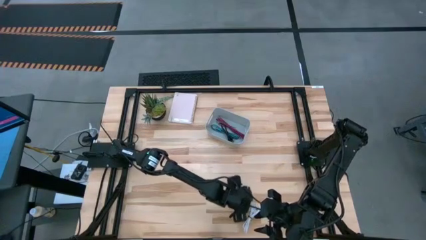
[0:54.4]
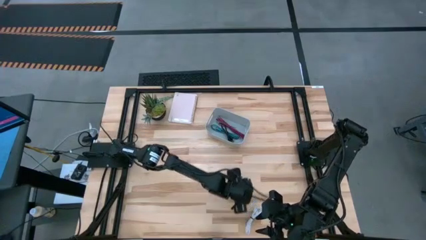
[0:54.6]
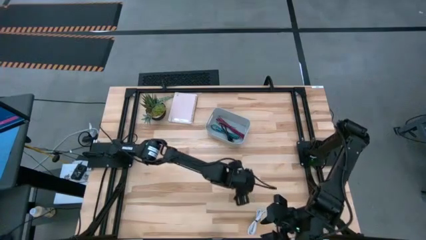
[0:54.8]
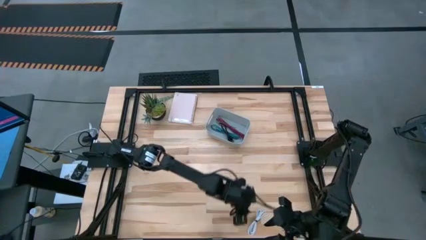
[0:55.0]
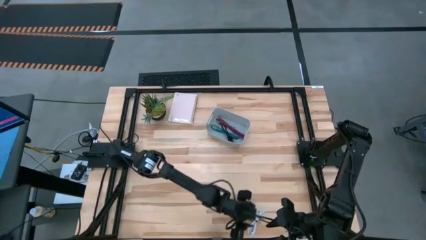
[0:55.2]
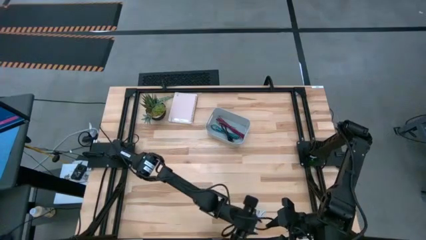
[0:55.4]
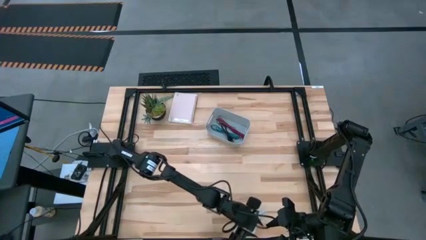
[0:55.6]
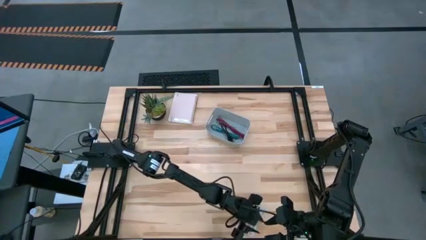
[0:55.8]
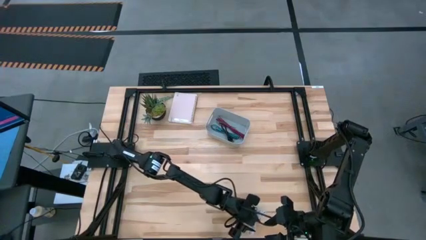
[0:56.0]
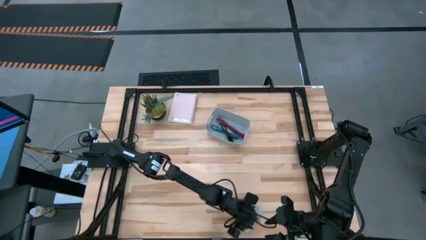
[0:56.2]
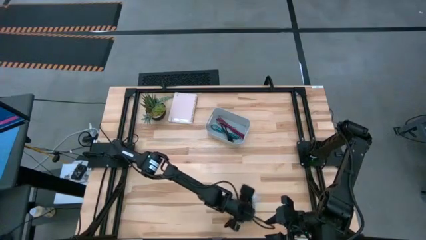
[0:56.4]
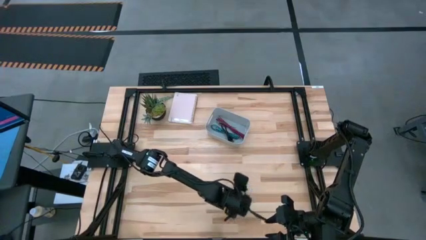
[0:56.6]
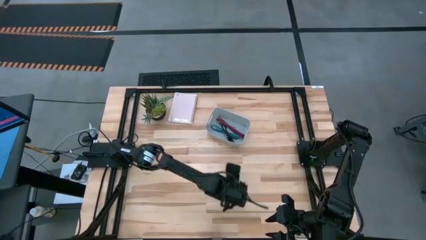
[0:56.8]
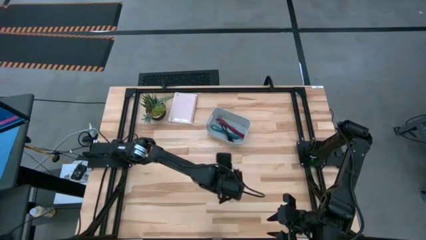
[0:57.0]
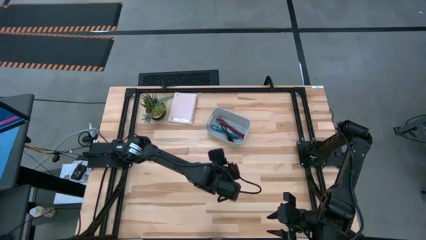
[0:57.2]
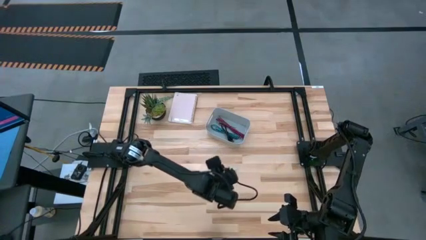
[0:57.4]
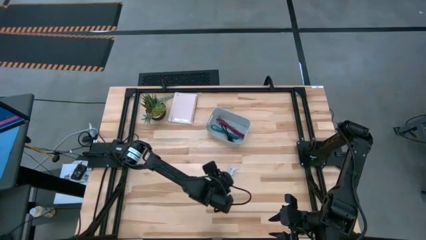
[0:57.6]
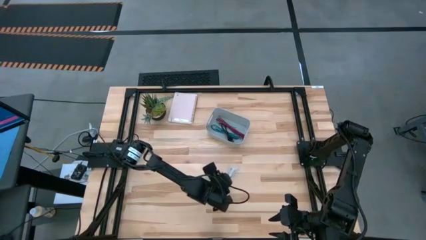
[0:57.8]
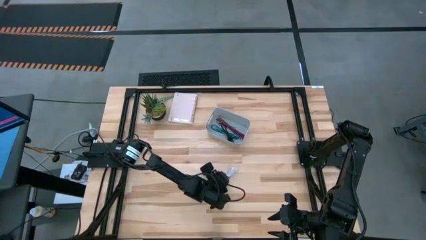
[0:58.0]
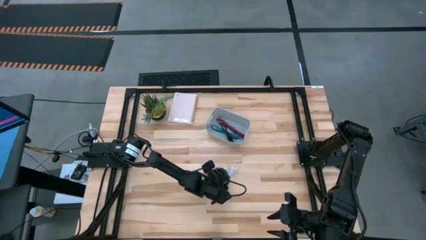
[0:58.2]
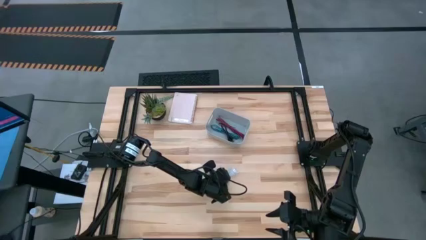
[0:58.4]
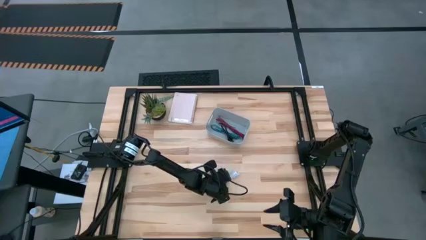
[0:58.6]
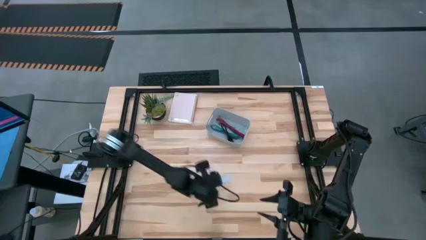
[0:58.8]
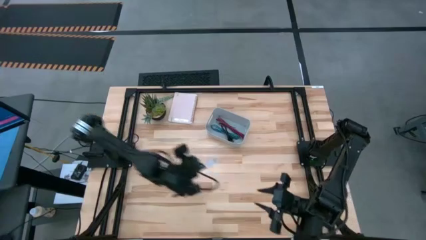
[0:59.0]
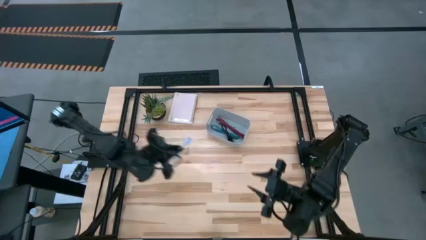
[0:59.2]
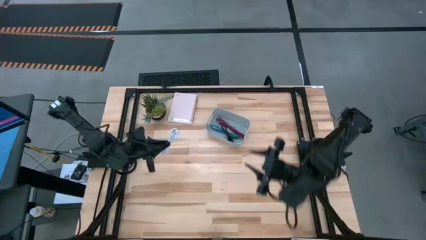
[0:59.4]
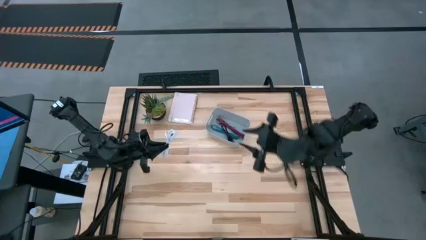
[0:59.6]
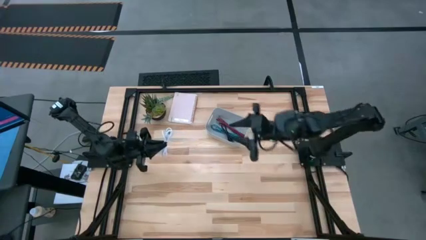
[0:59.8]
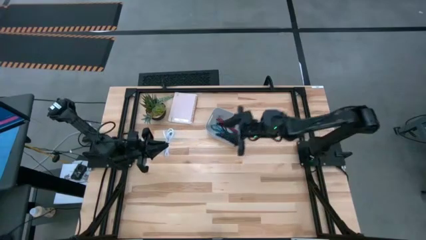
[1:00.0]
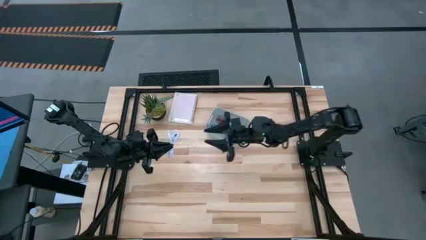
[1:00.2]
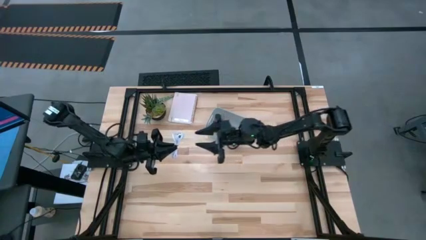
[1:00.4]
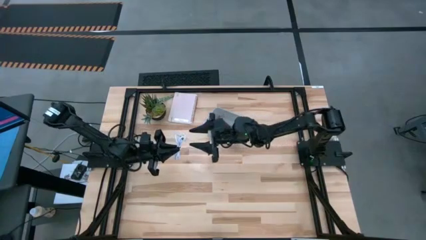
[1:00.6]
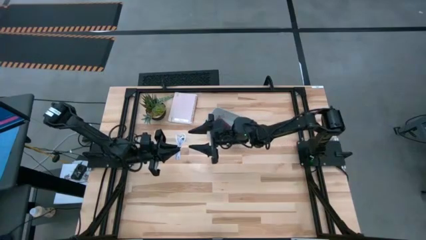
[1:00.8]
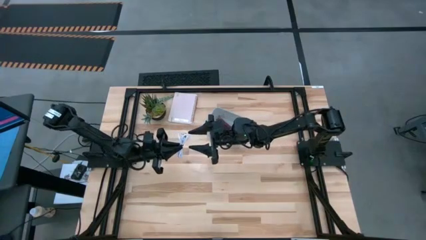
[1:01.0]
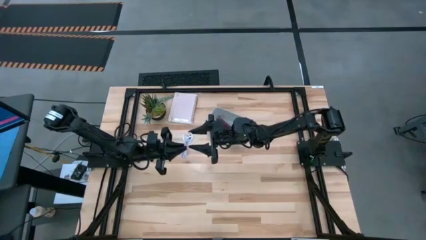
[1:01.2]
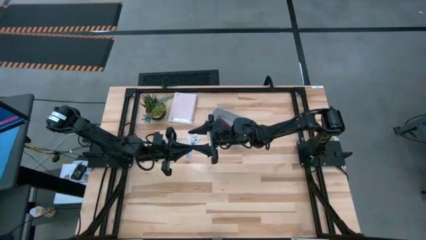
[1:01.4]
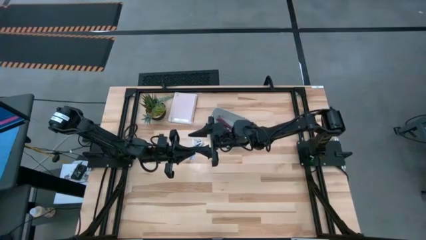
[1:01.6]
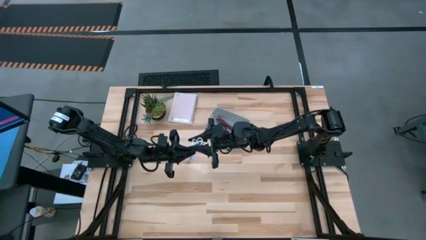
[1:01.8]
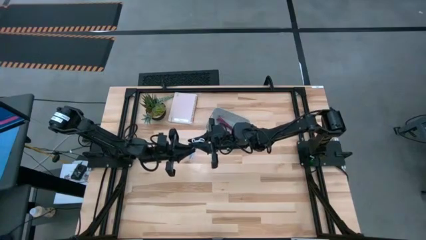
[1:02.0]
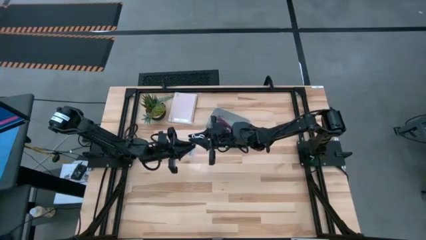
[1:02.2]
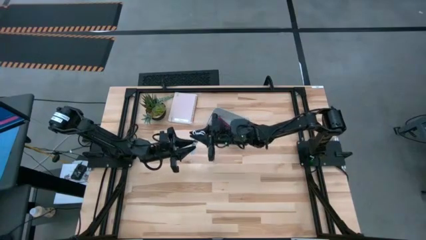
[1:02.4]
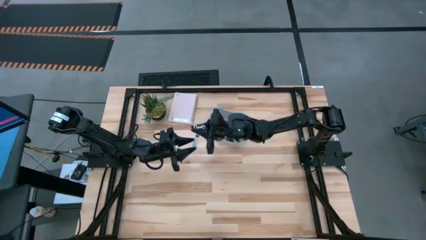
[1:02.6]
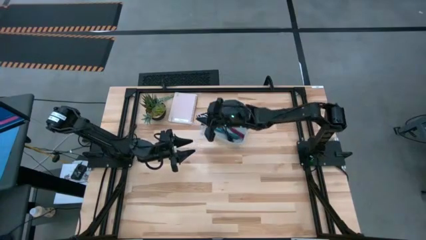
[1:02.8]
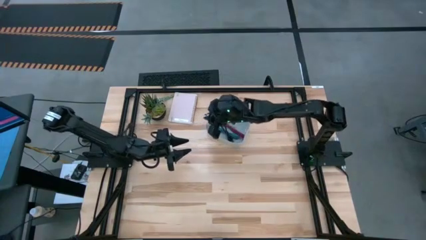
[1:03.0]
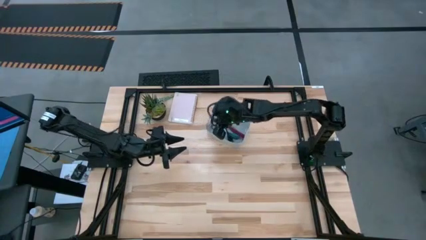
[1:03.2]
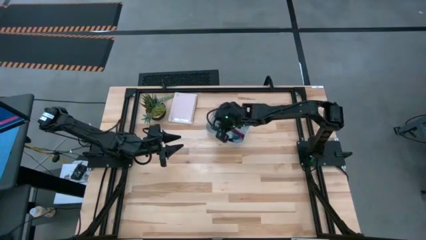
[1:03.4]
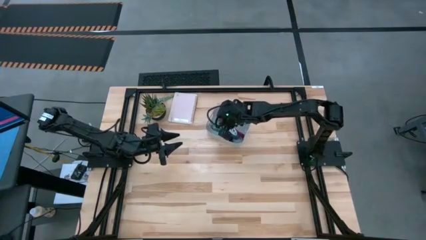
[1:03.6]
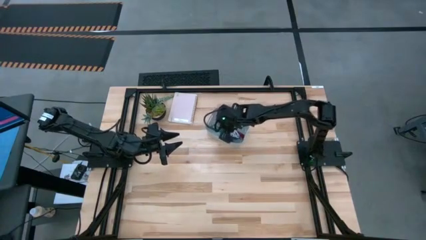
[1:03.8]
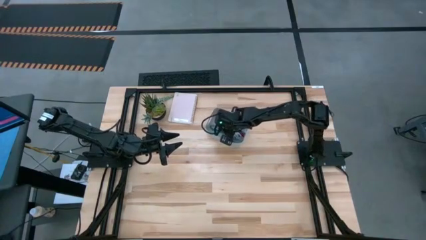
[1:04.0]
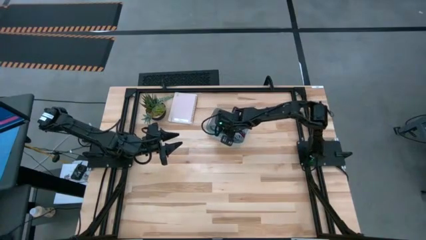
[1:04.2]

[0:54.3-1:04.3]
Task: Pick and place USB-C Cables
Put the white charger cable into the gray bin

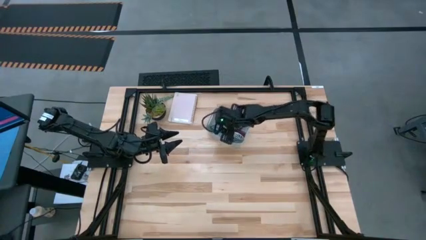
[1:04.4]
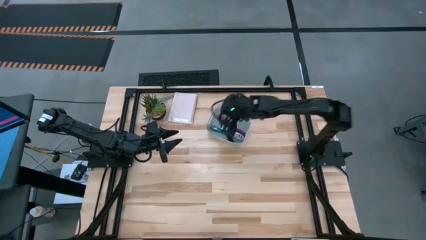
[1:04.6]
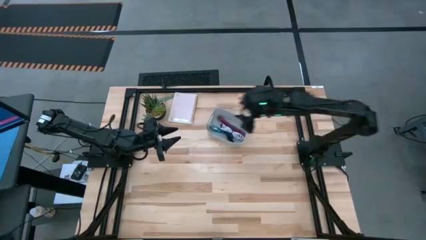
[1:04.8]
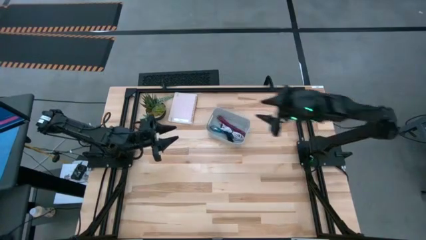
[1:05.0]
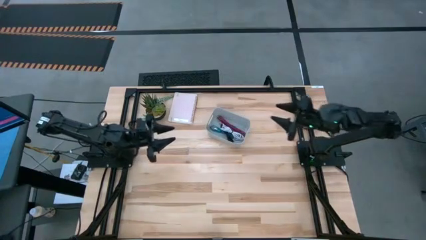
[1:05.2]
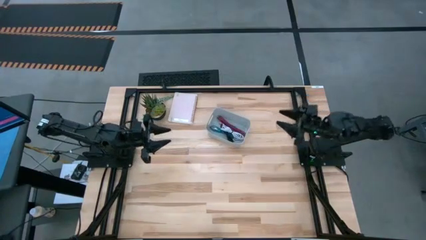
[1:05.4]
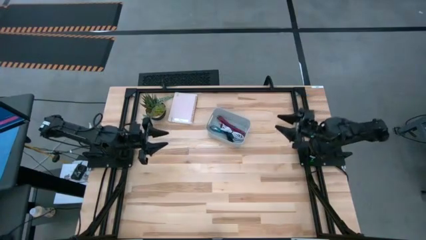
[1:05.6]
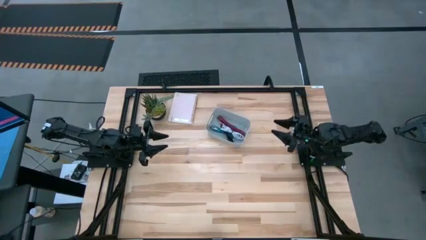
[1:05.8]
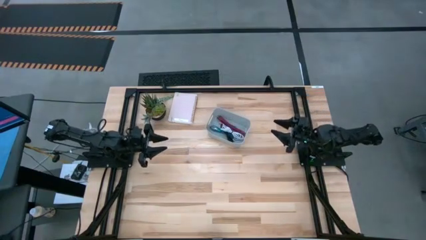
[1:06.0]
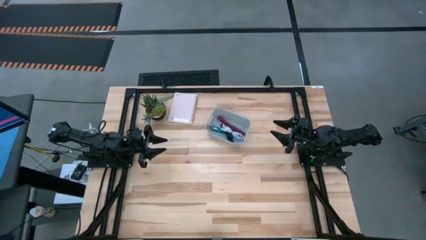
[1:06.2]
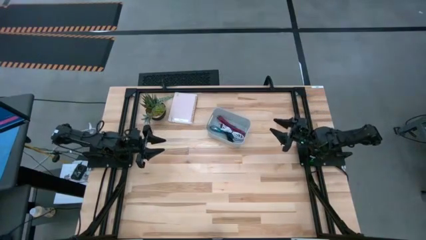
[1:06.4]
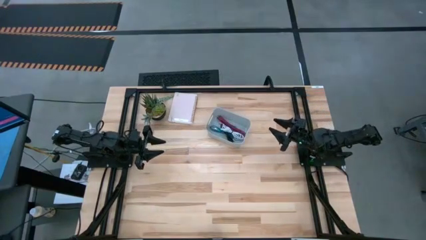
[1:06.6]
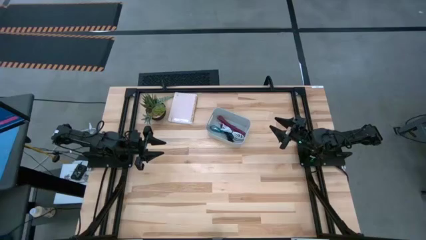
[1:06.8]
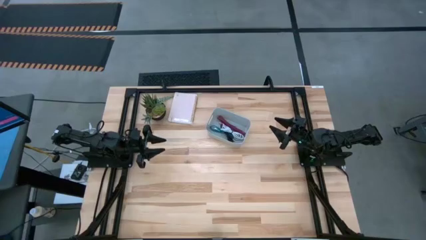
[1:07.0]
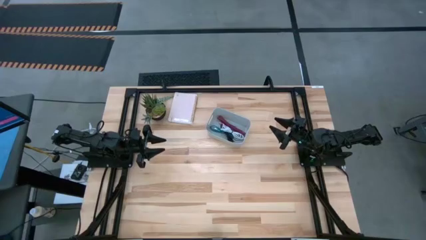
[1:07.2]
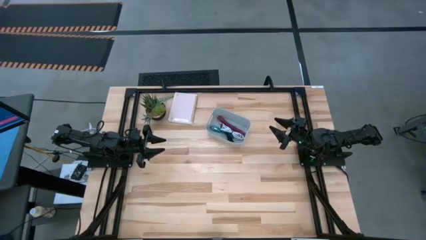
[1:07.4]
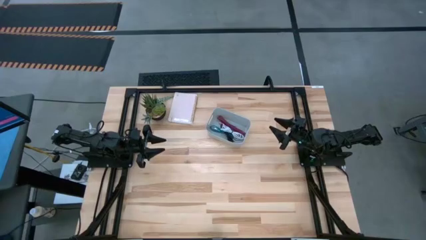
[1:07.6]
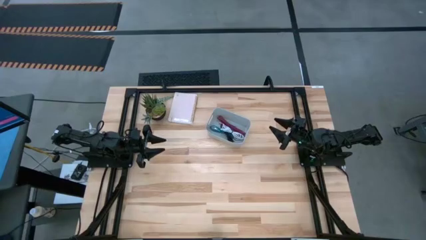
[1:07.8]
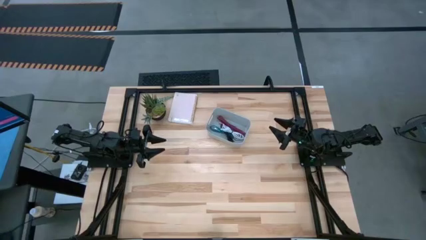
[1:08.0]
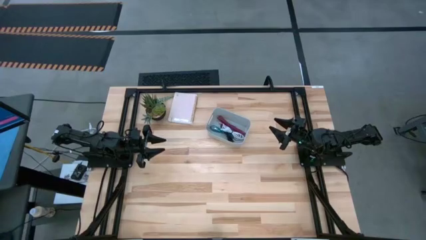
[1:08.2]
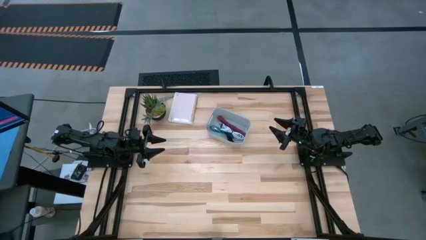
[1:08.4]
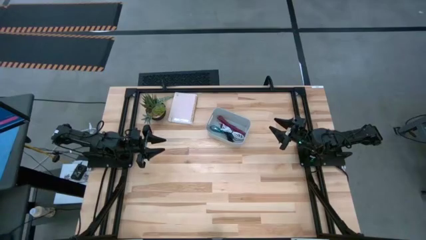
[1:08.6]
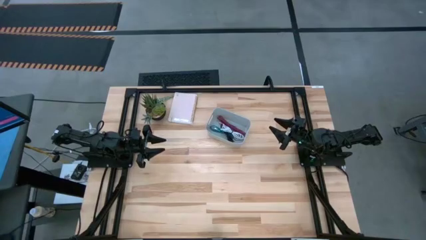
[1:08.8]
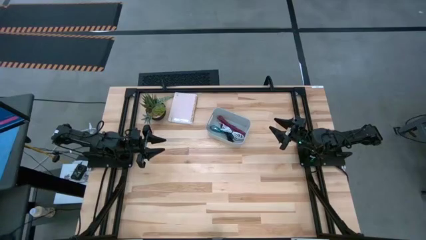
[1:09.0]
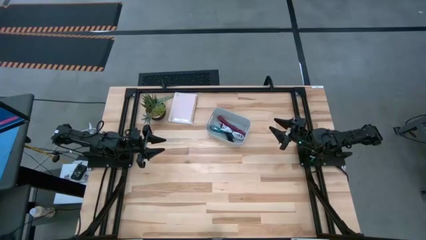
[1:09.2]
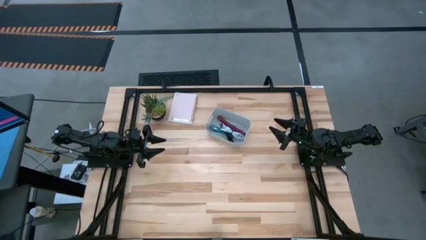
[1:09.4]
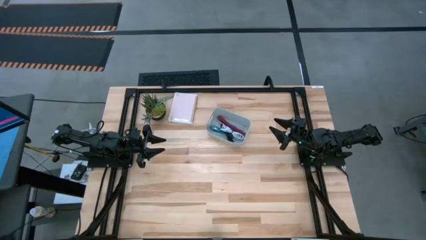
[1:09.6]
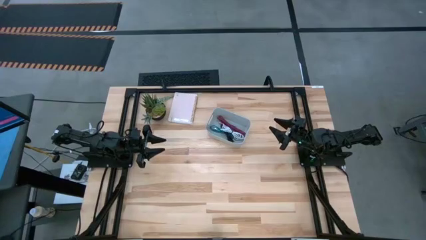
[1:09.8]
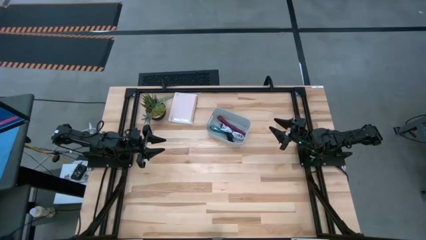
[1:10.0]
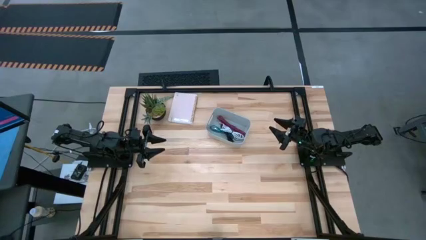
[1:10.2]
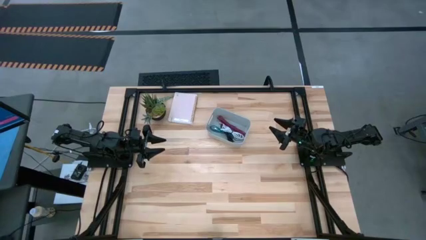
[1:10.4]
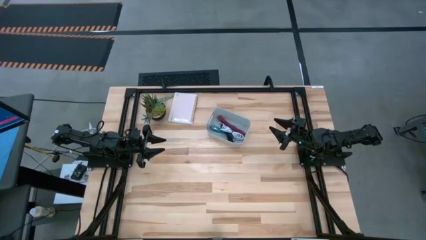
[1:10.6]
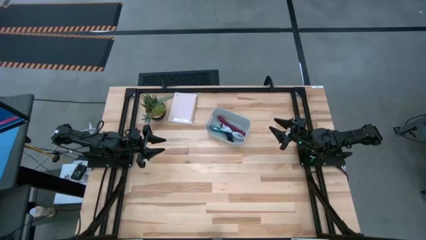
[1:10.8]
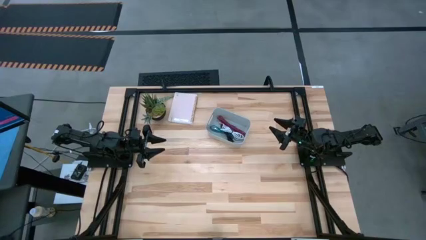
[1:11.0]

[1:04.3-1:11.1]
Return to Home Position
